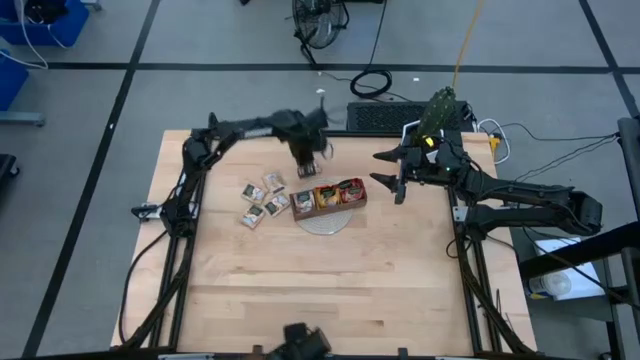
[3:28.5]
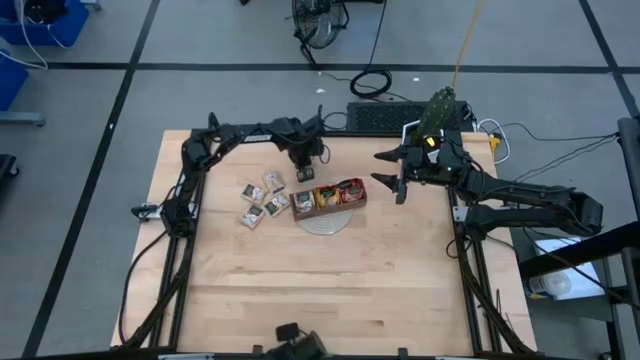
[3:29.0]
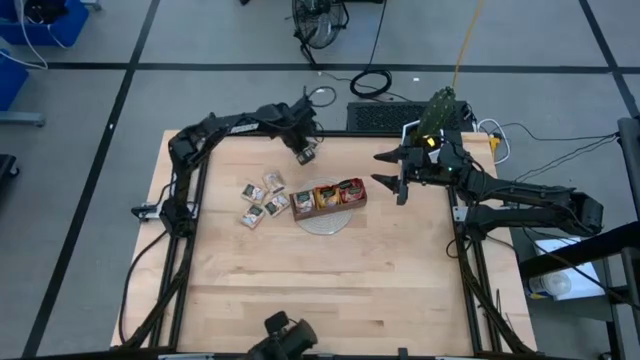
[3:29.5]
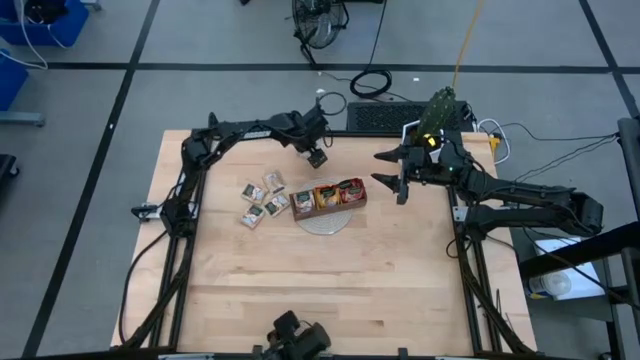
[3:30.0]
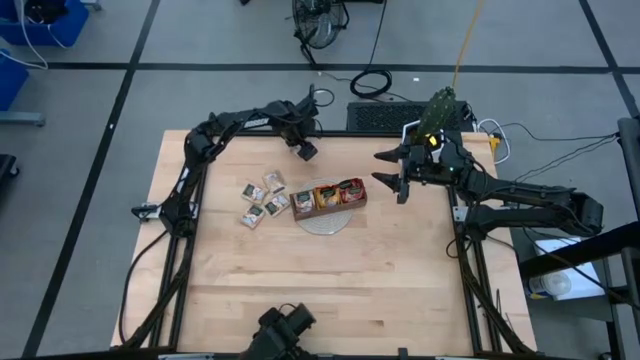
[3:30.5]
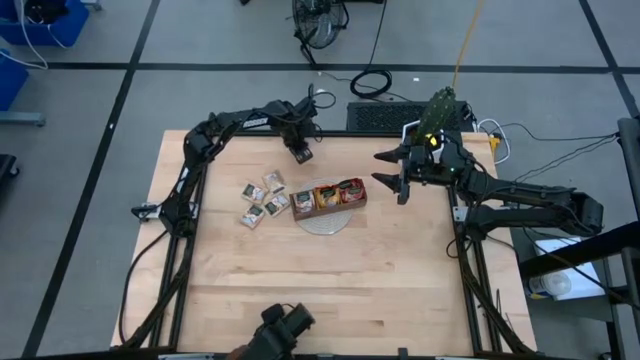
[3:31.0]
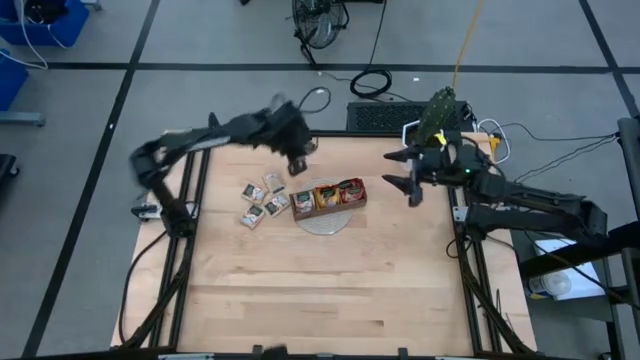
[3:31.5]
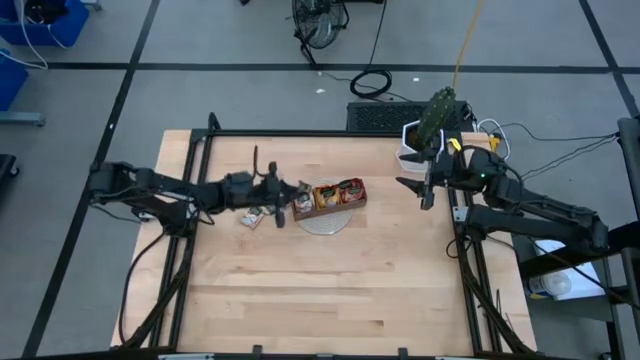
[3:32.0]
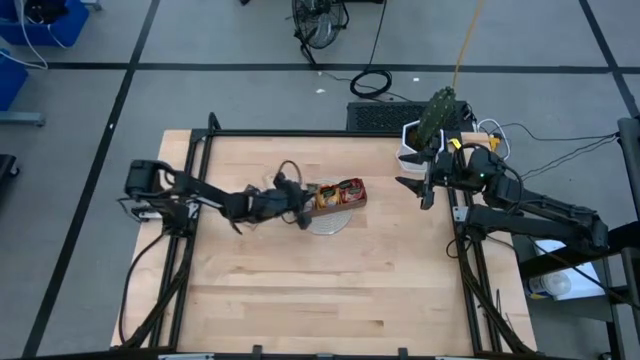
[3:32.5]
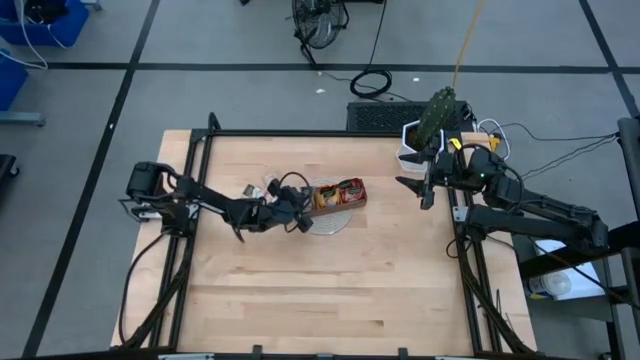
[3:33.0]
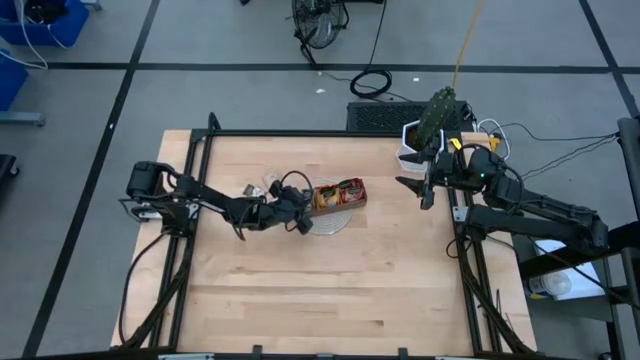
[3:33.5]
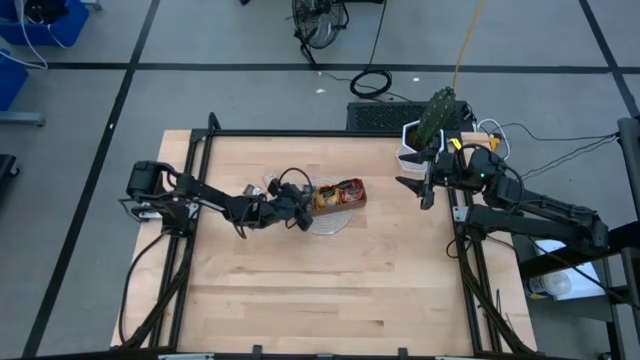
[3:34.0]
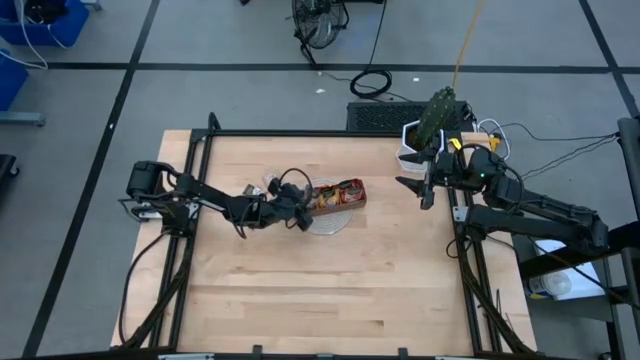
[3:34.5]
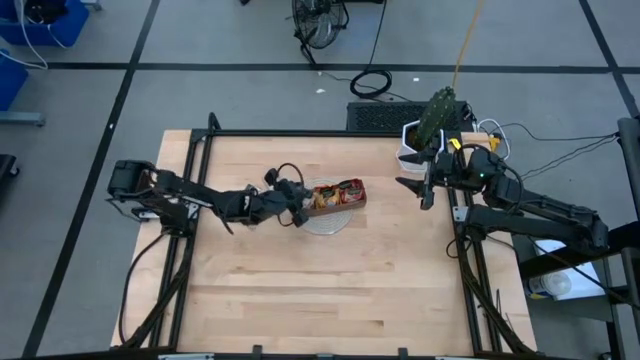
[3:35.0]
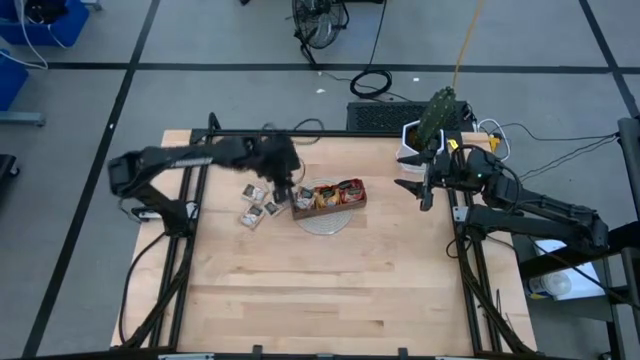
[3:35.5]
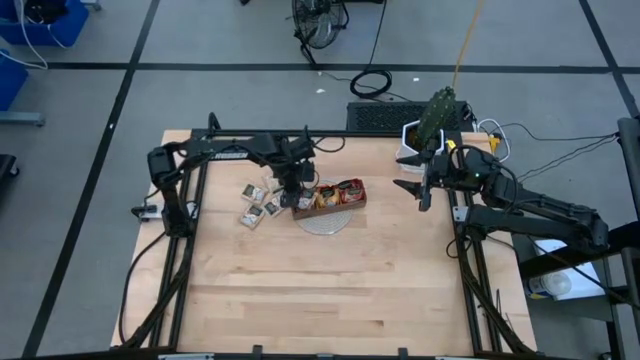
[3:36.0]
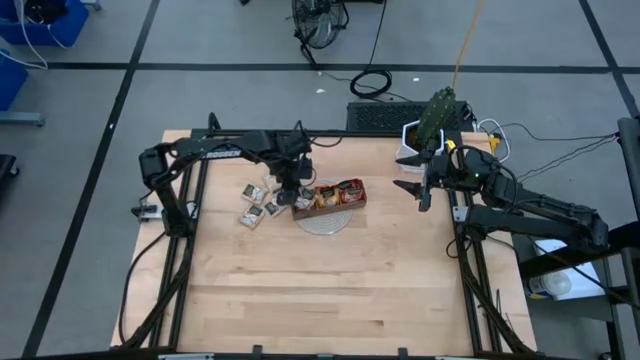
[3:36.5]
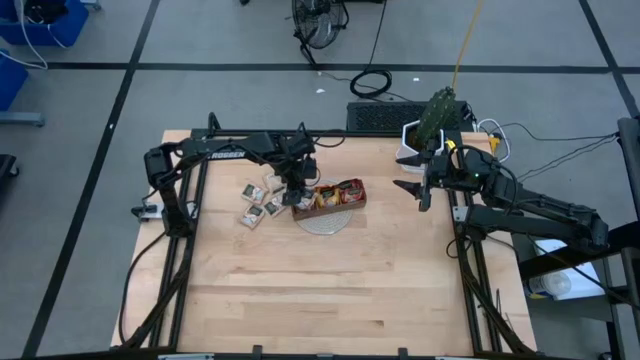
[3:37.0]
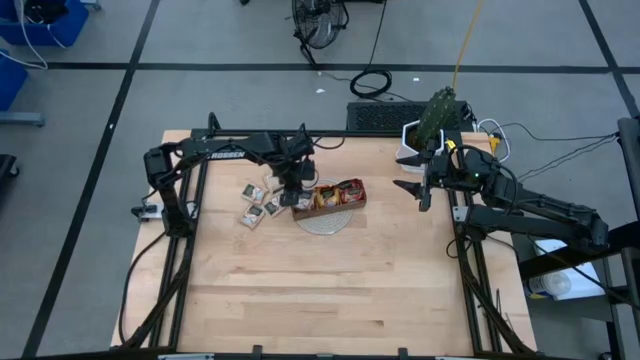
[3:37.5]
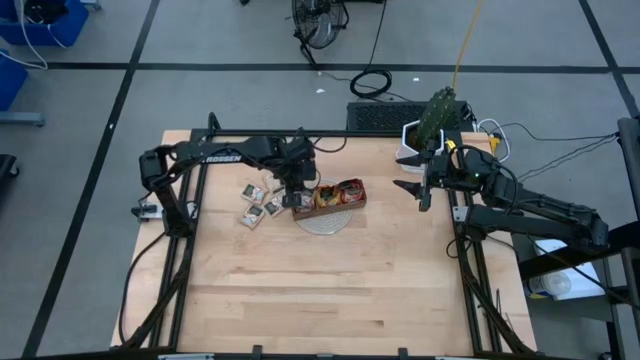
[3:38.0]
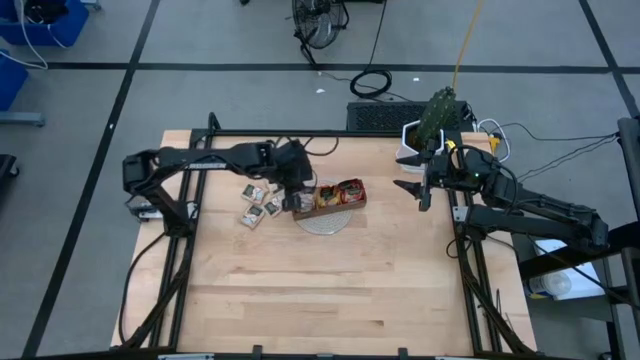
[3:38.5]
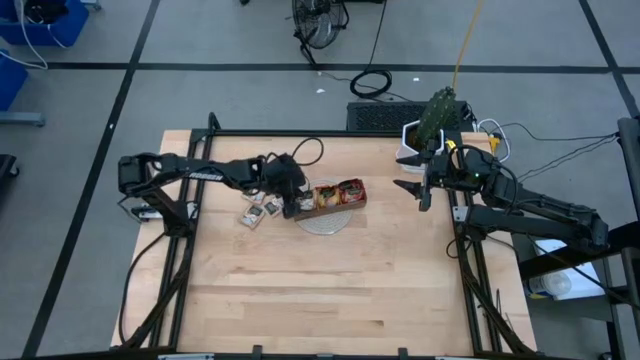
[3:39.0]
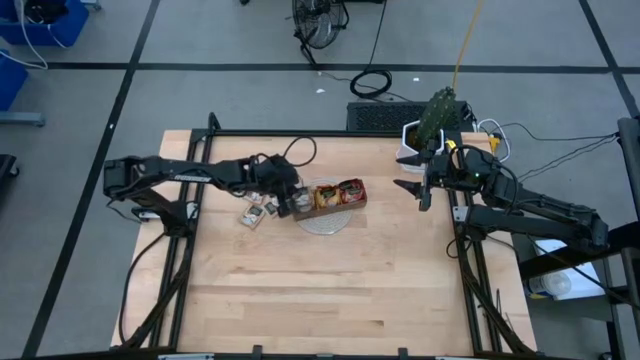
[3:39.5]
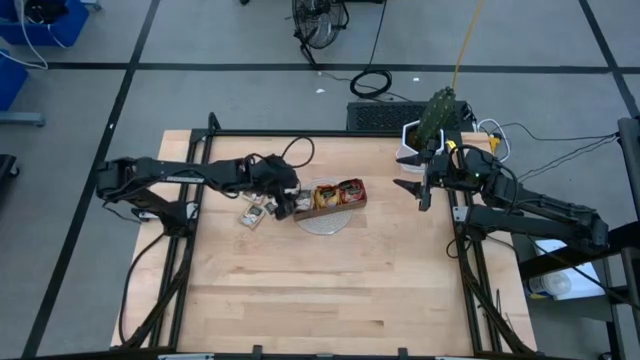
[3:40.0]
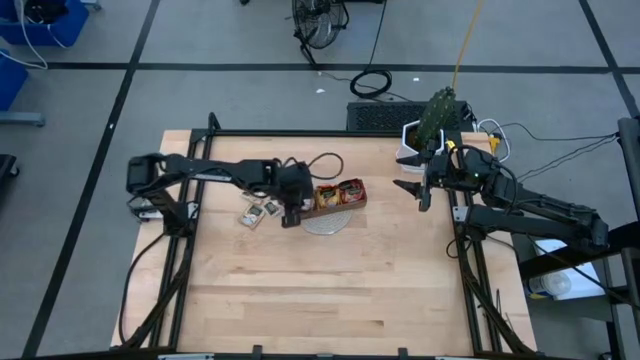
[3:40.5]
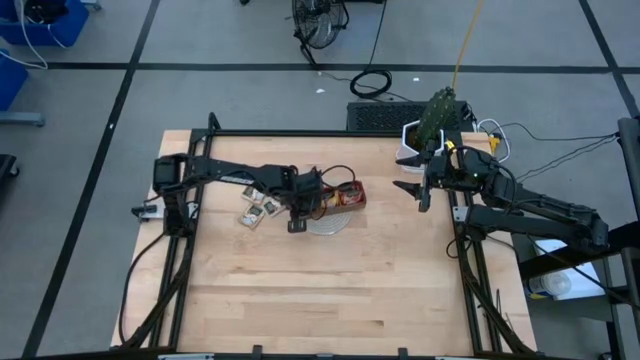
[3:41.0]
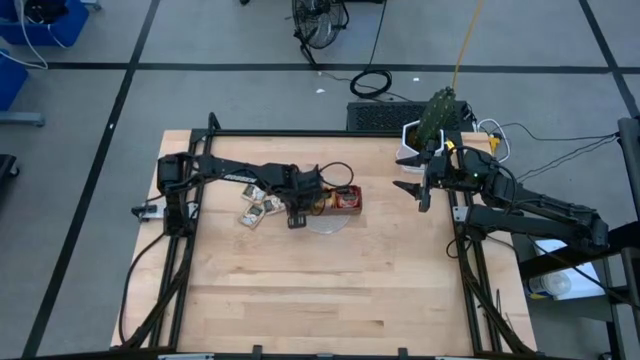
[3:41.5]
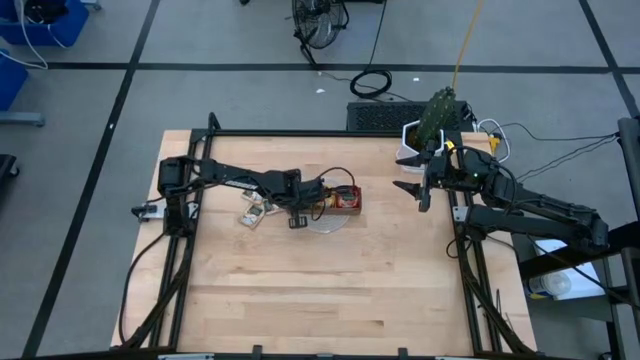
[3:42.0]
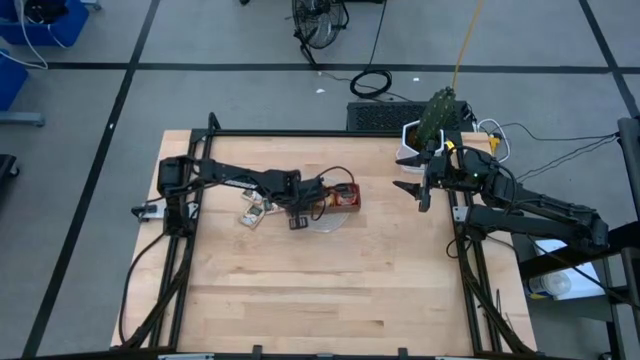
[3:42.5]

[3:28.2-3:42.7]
Task: Pick & Place Tea
Put the tan gold tea bag into the left section of the wood organizer

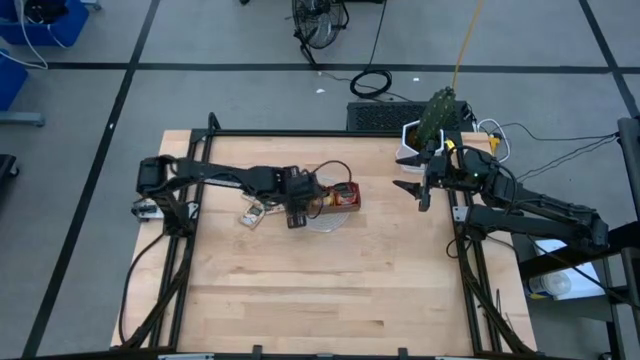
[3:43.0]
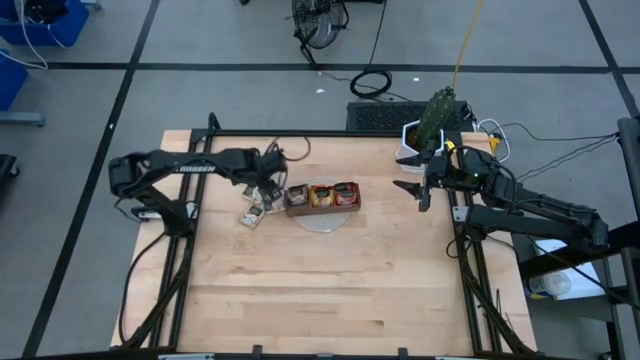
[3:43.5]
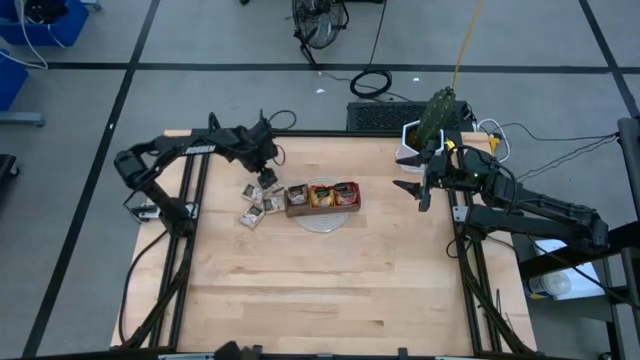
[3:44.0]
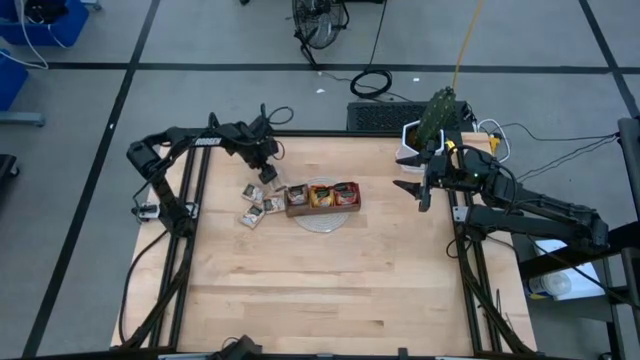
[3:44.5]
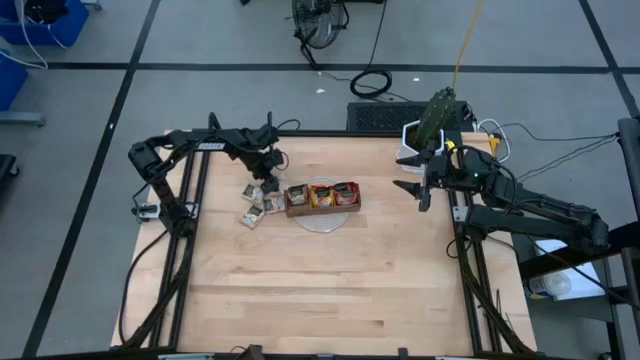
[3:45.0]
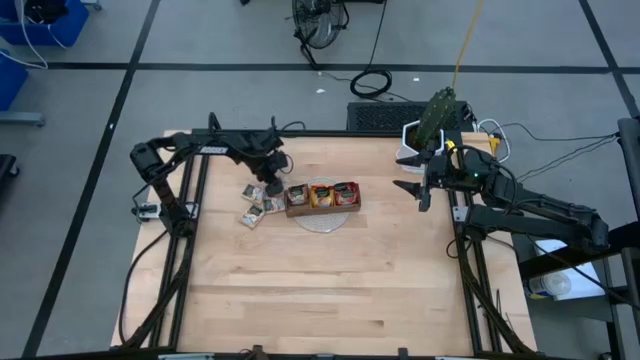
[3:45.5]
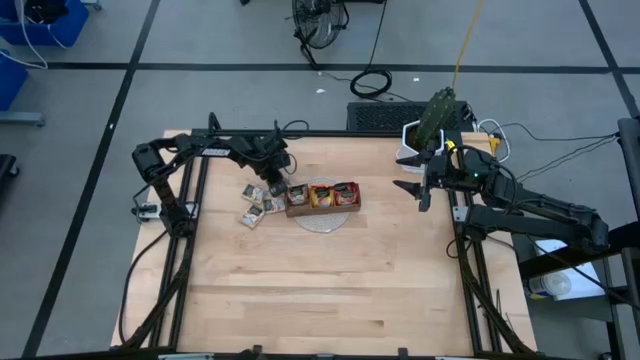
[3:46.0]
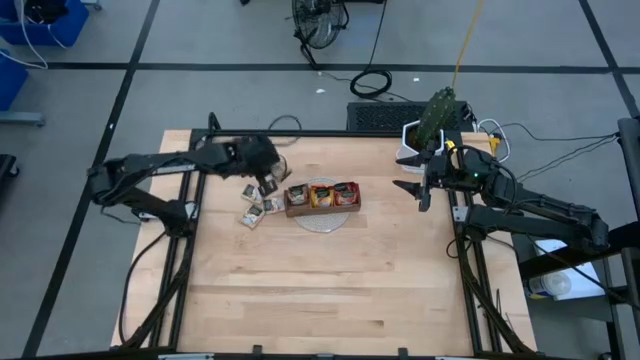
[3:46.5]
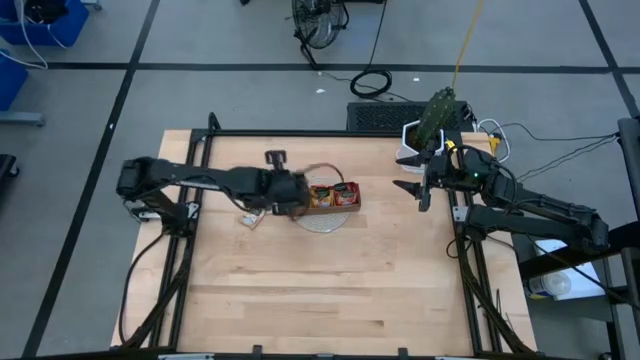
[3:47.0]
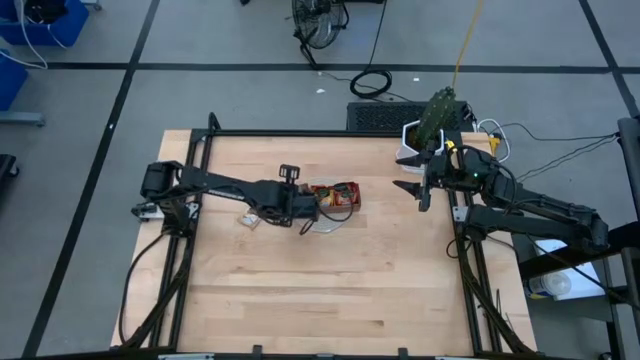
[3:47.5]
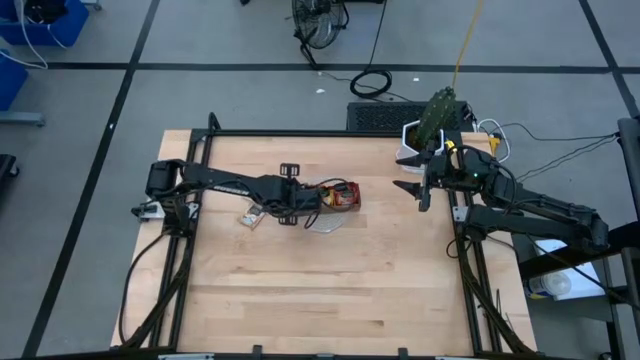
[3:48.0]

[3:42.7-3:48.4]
Put the tan gold tea bag into the left section of the wood organizer

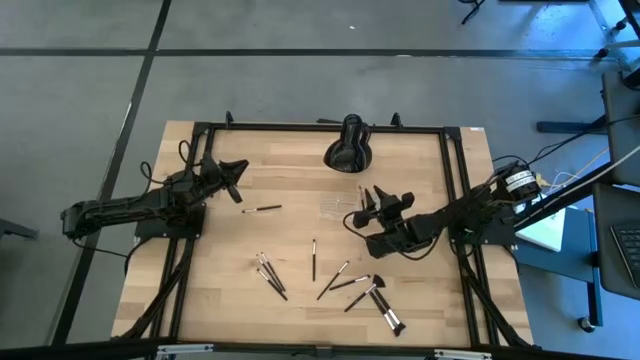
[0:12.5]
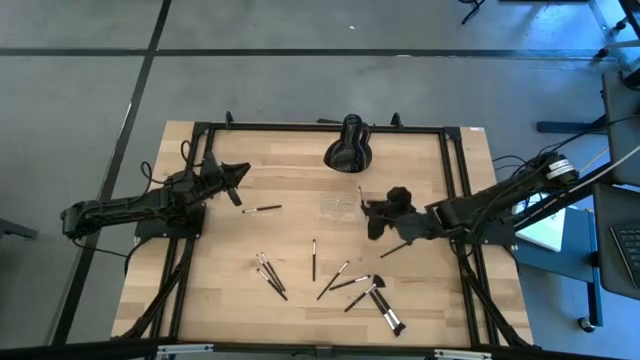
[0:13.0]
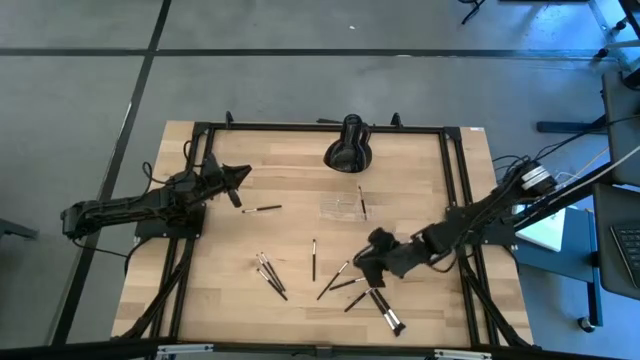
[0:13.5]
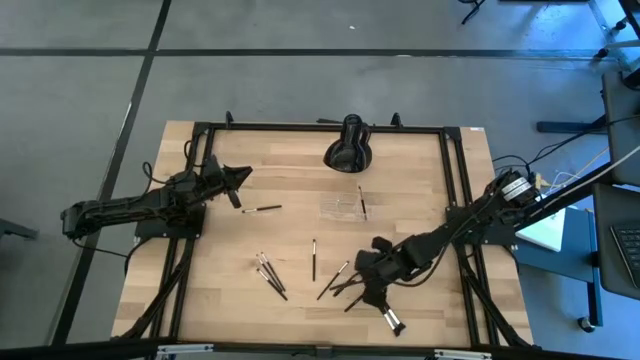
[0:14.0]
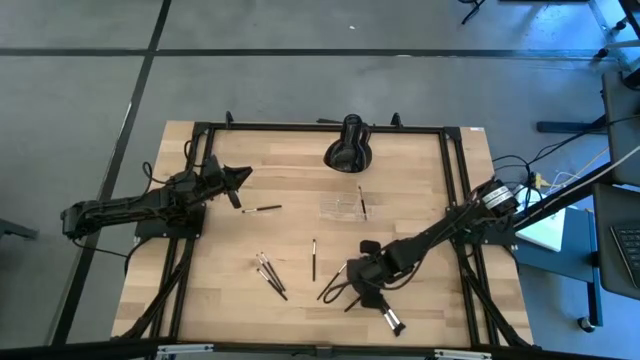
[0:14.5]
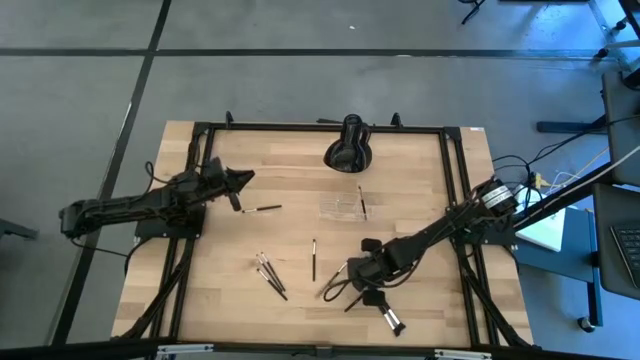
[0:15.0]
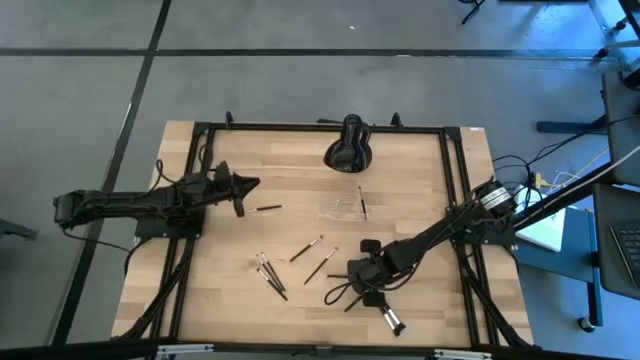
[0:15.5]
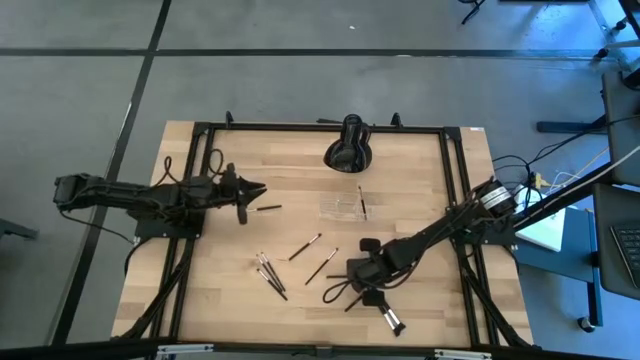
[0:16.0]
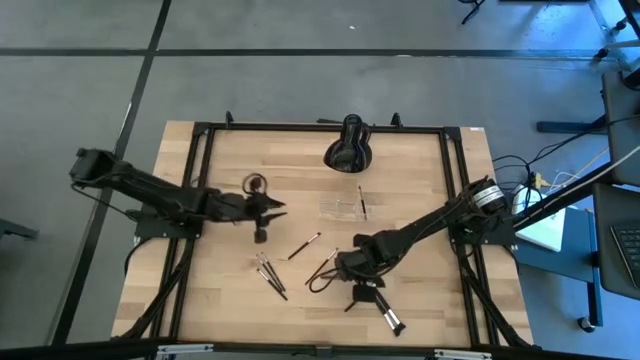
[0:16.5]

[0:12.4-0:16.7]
Task: Pick & Place Makeup Supplies
Put the makeup brush into the transparent organizer
